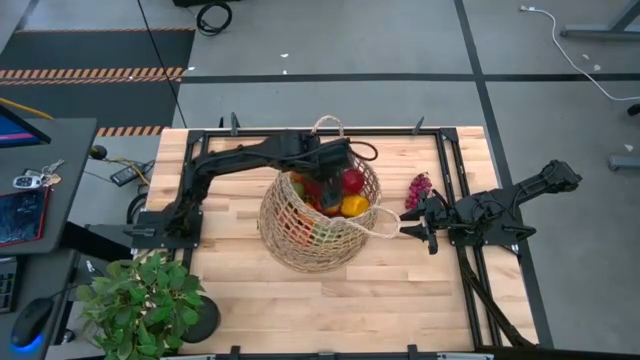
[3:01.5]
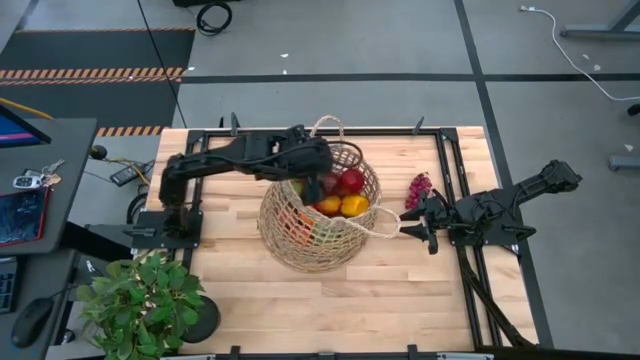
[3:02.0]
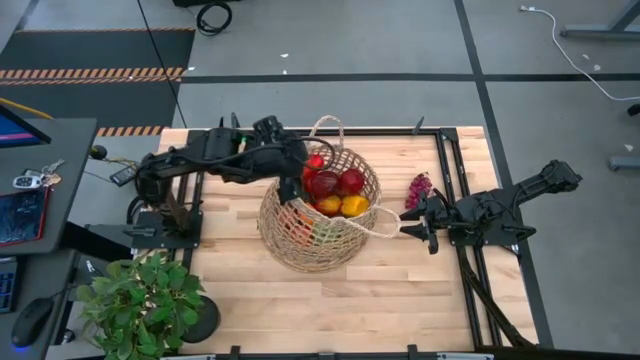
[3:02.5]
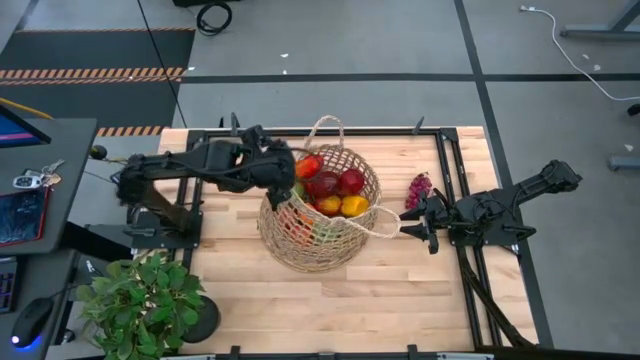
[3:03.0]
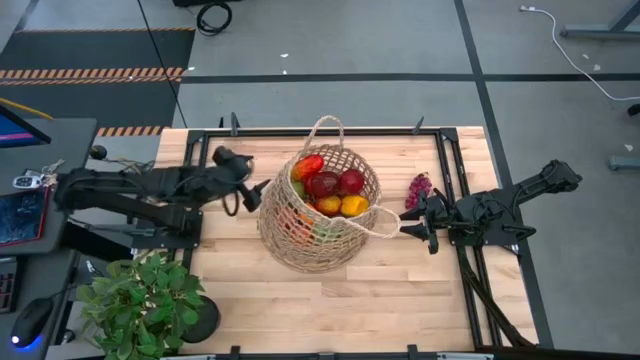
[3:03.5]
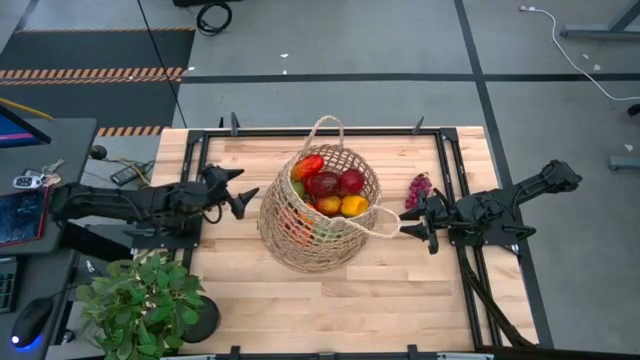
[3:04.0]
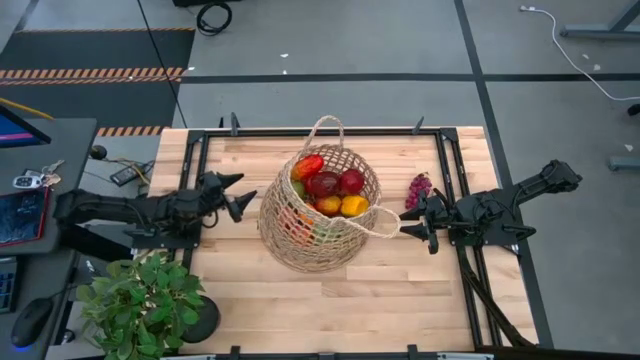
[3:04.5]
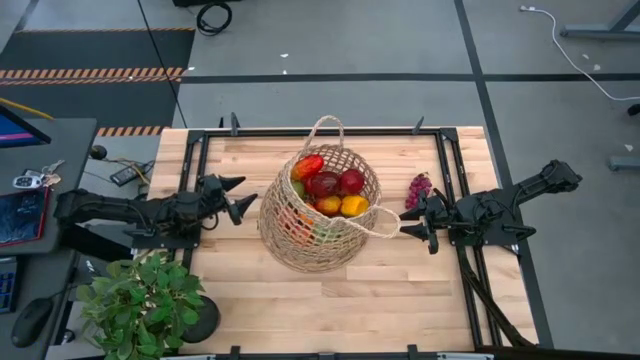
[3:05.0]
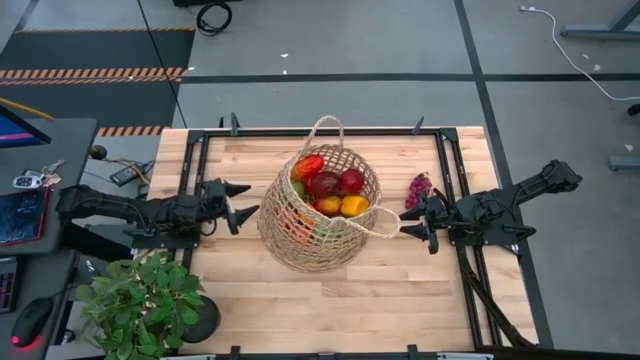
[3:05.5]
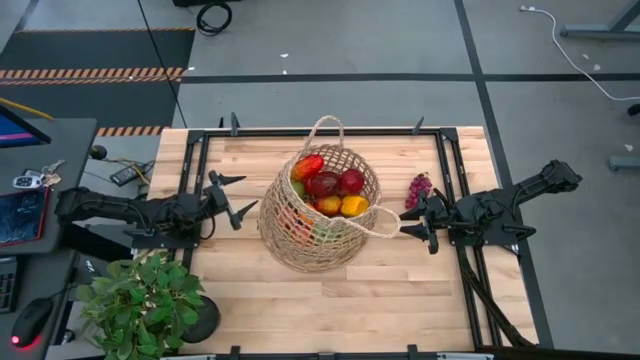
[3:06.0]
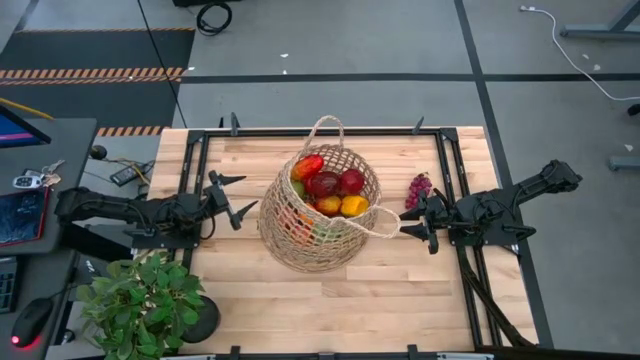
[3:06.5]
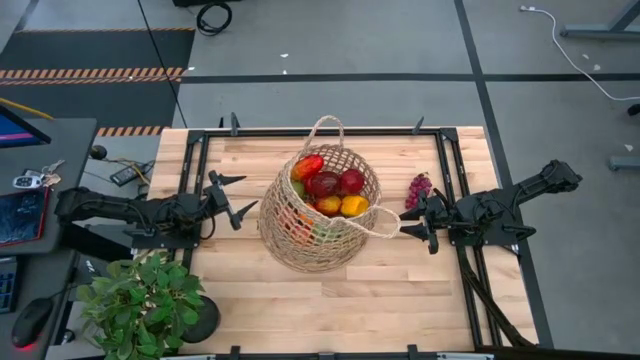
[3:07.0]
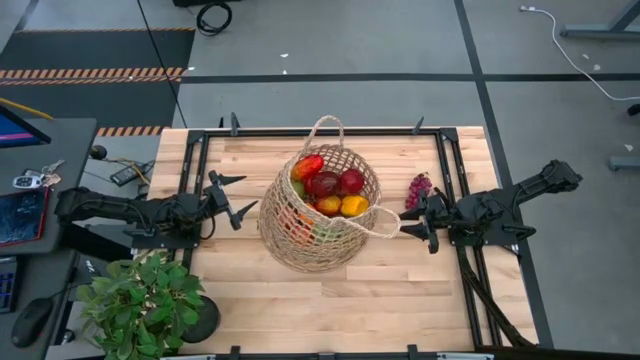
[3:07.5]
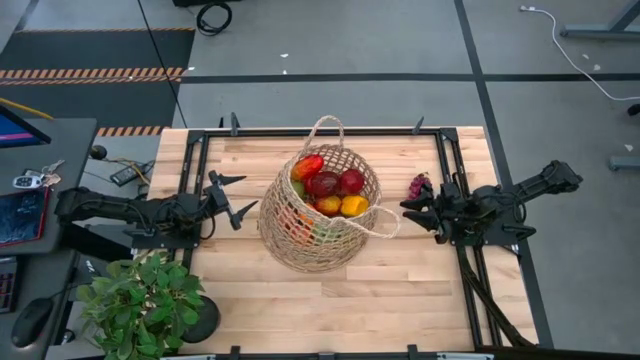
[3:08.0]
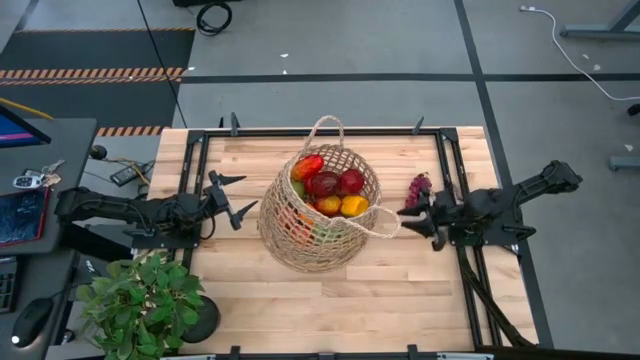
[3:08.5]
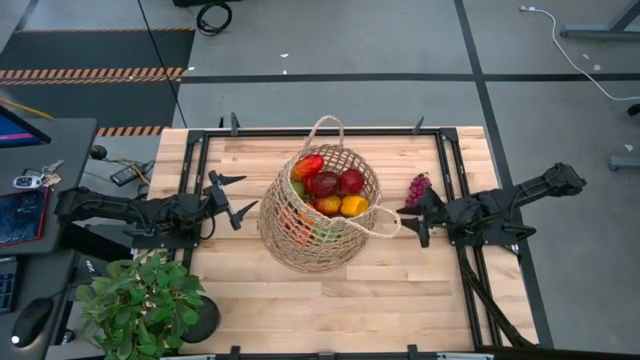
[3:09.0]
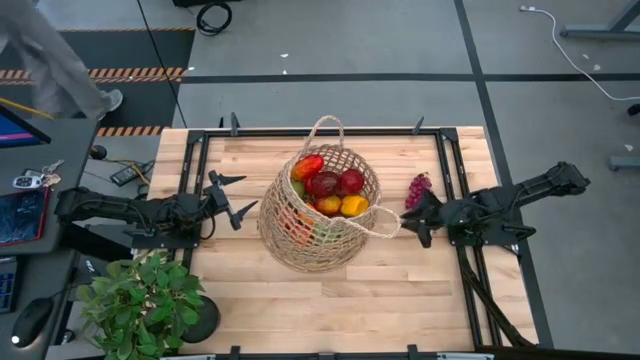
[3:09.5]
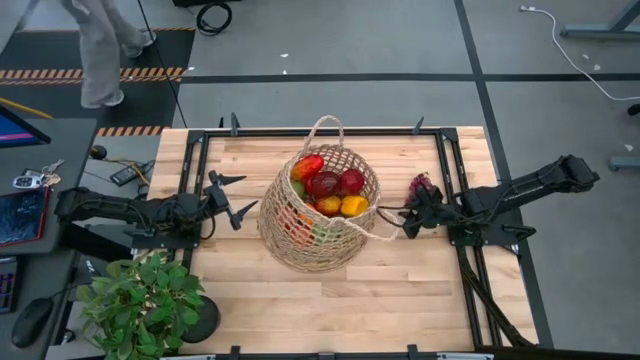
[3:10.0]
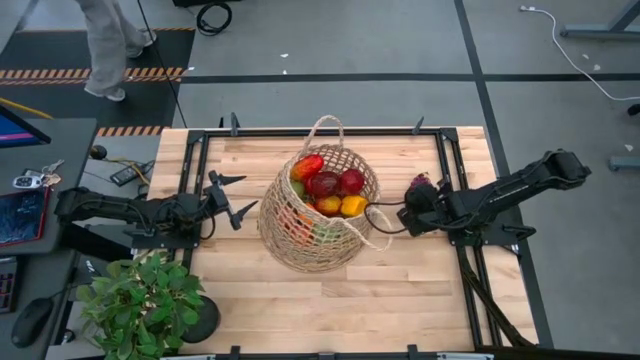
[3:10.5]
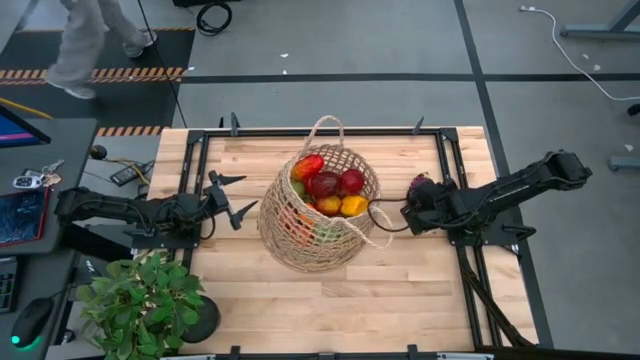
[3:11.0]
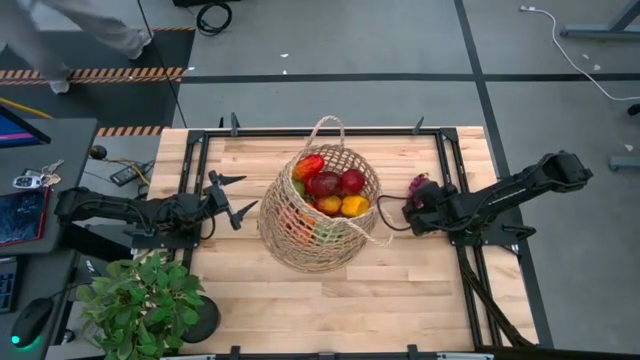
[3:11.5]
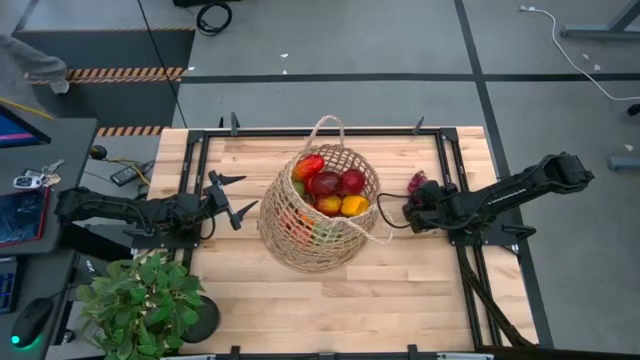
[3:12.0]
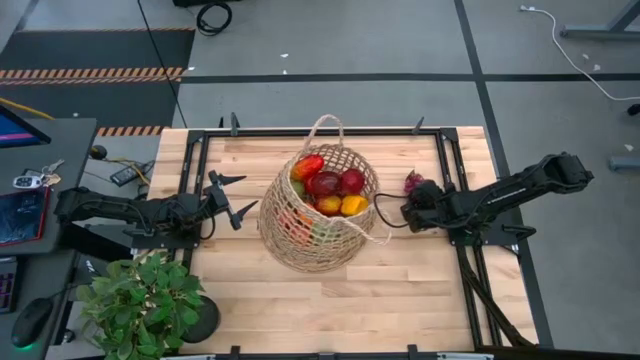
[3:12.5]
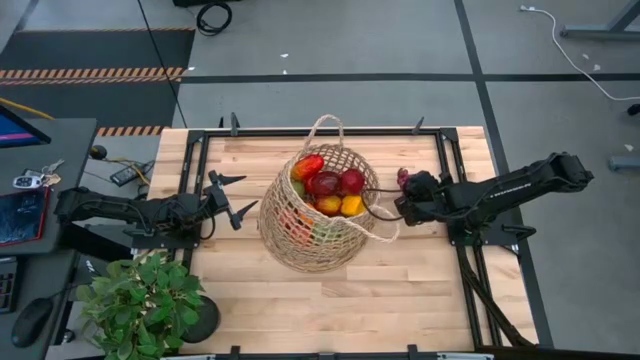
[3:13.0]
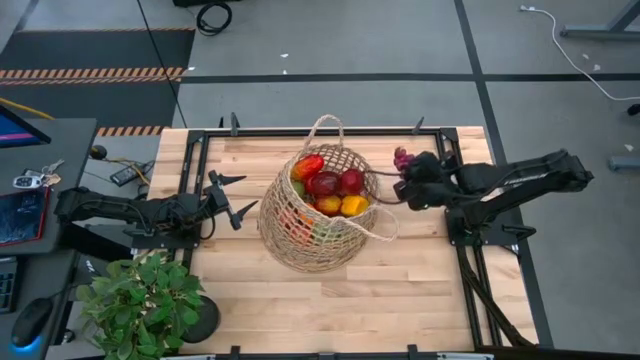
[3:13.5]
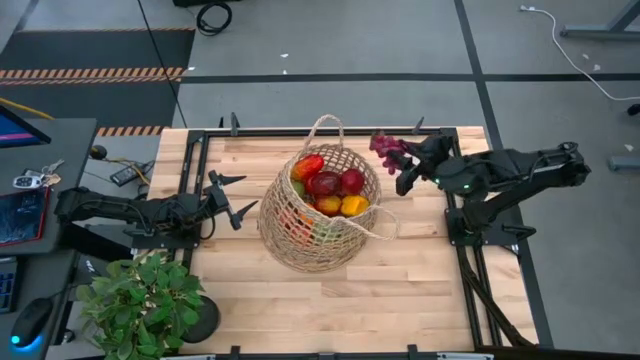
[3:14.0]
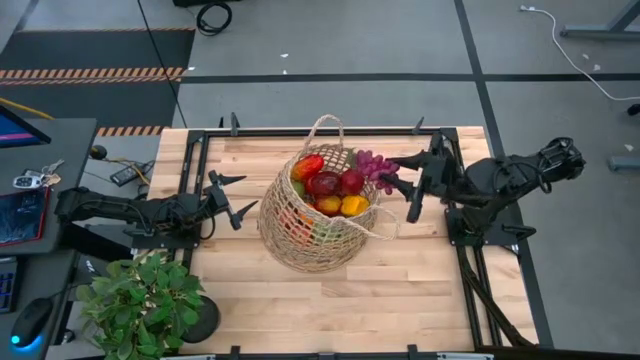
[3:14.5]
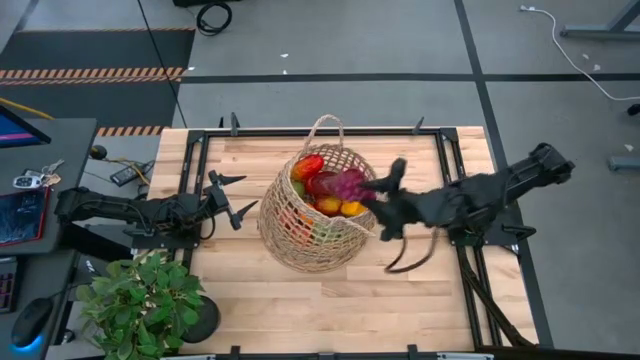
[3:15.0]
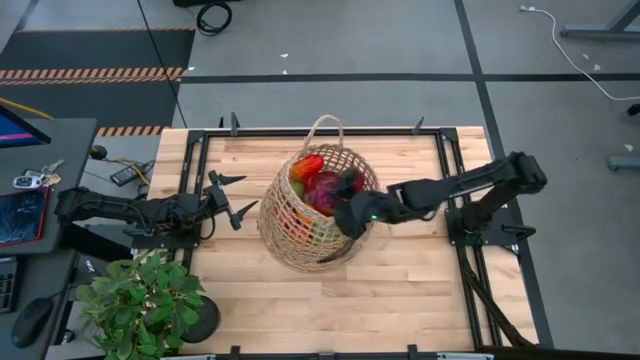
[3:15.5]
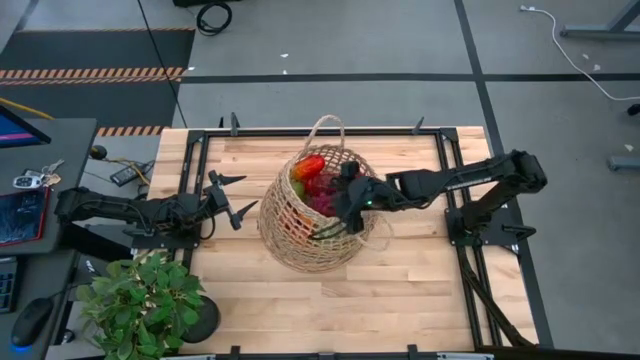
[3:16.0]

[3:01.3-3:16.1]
Task: Build produce basket
Put the grapes into the basket

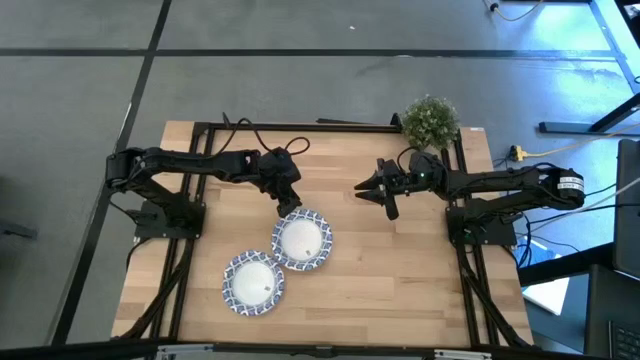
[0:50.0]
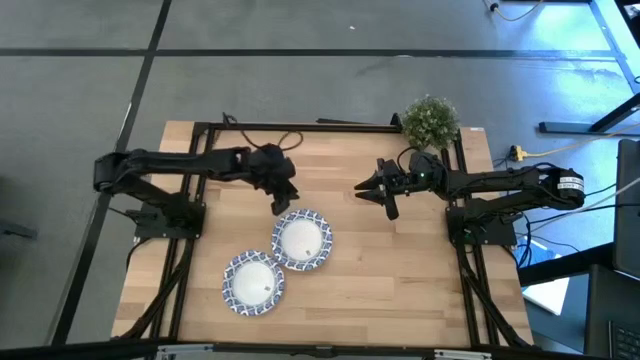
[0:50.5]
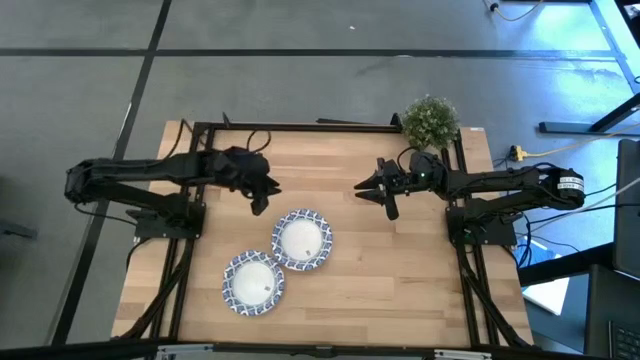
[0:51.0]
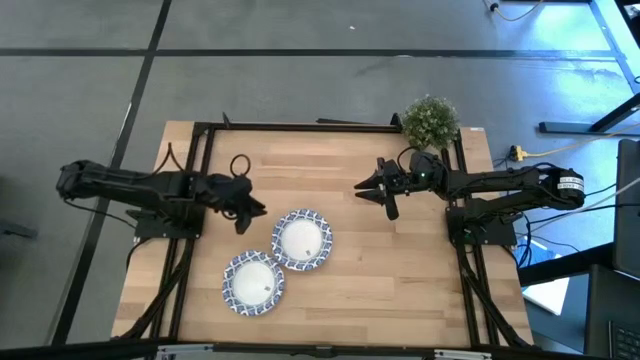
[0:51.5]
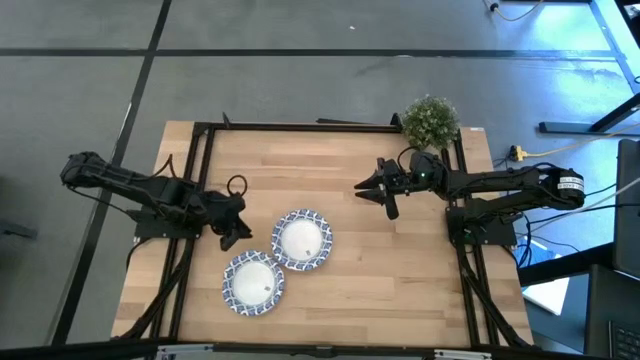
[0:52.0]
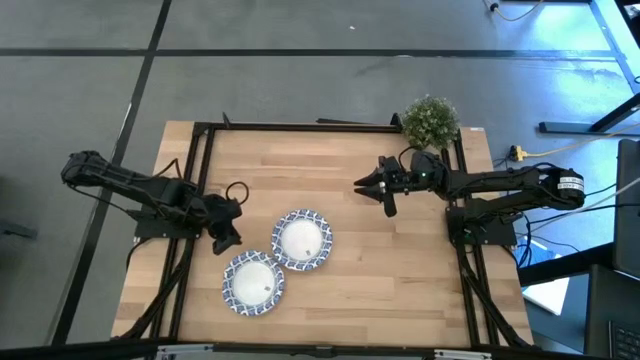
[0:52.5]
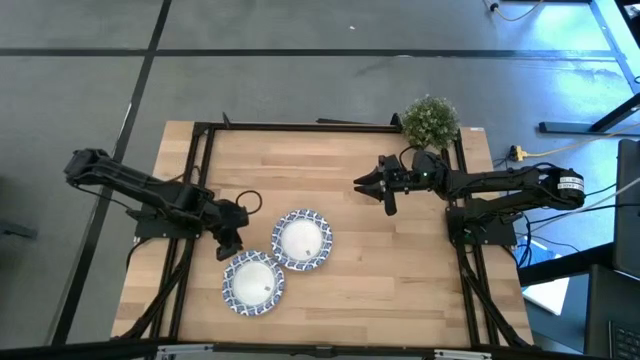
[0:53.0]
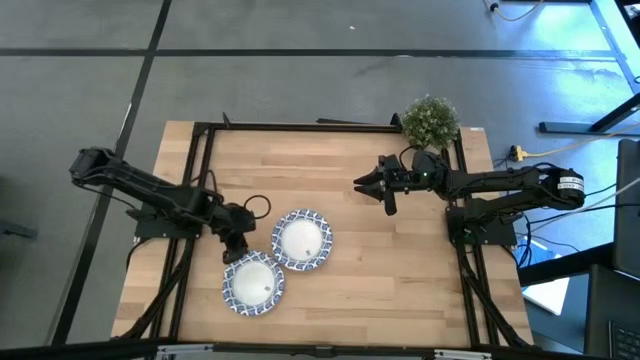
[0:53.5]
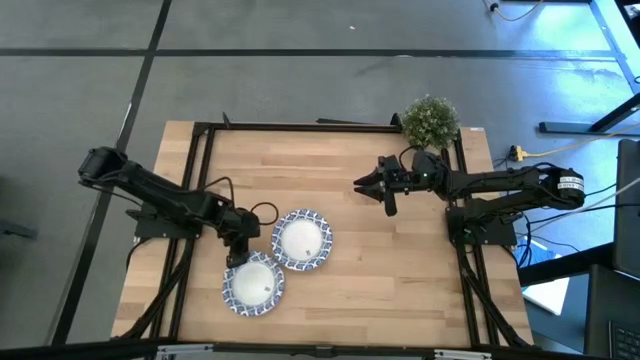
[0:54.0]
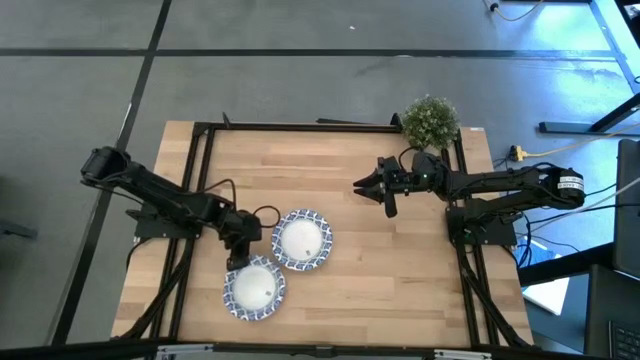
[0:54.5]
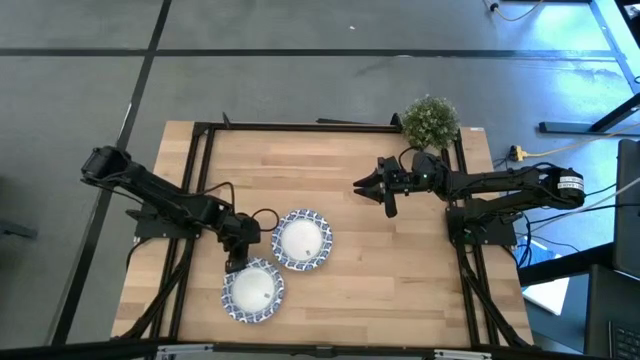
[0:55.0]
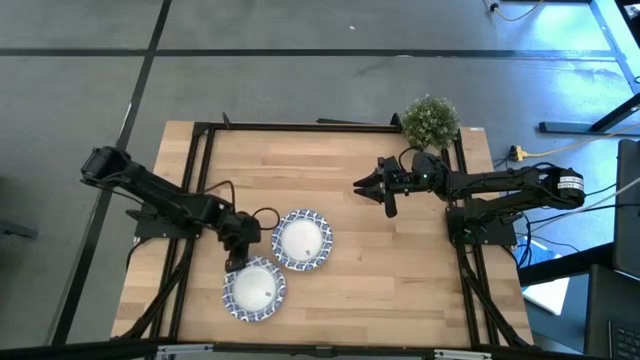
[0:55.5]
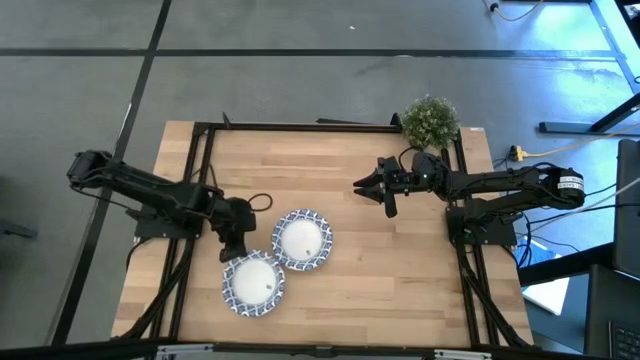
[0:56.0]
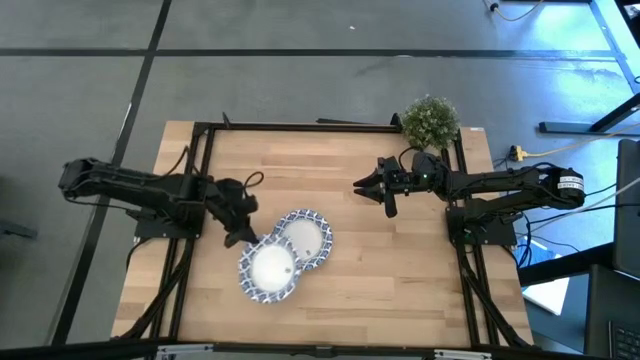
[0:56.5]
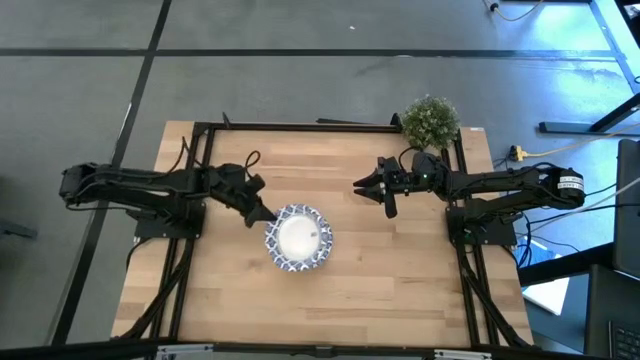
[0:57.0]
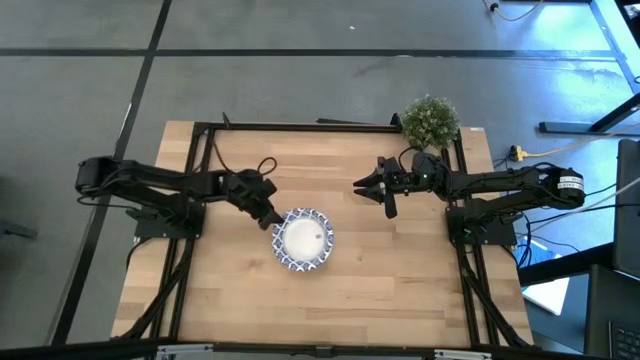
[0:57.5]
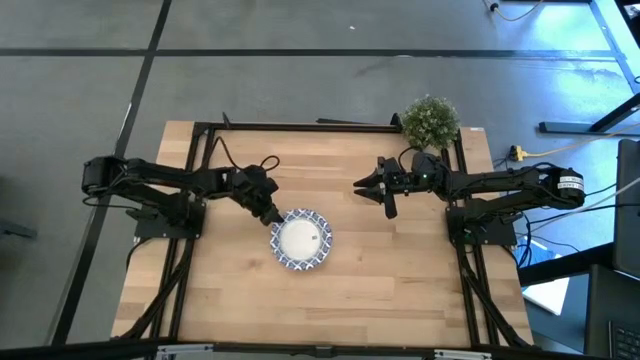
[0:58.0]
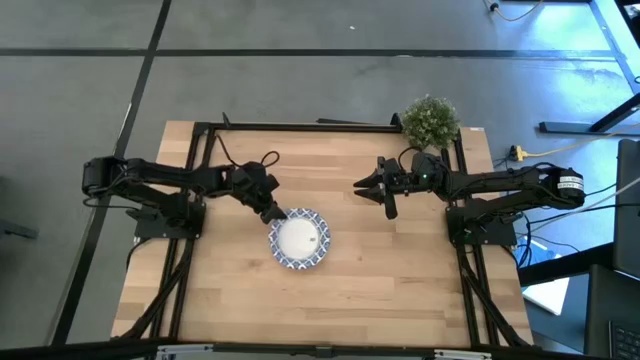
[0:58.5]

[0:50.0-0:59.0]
Task: Nest bowls inside each other
Stack the white patterned bowl on top of the other white patterned bowls
